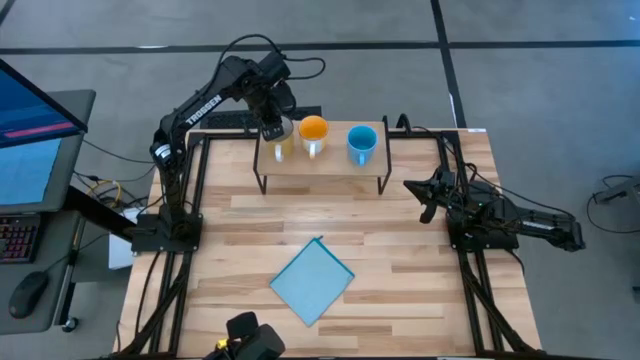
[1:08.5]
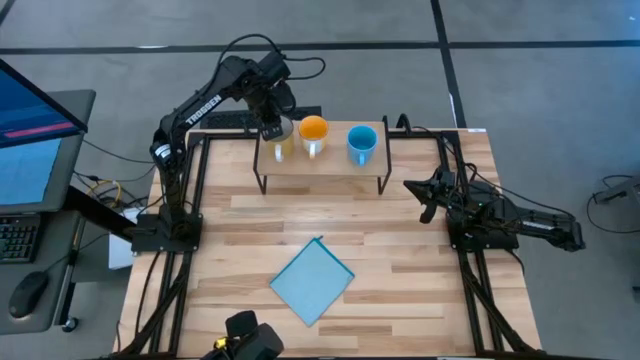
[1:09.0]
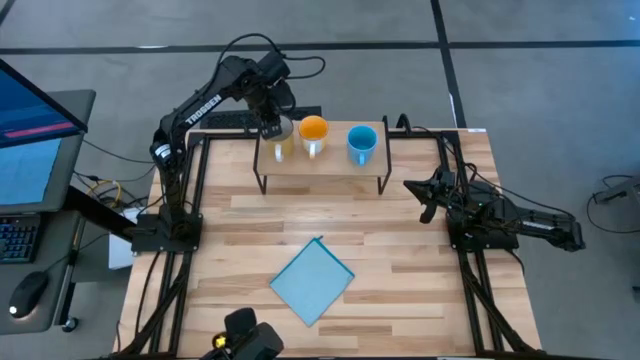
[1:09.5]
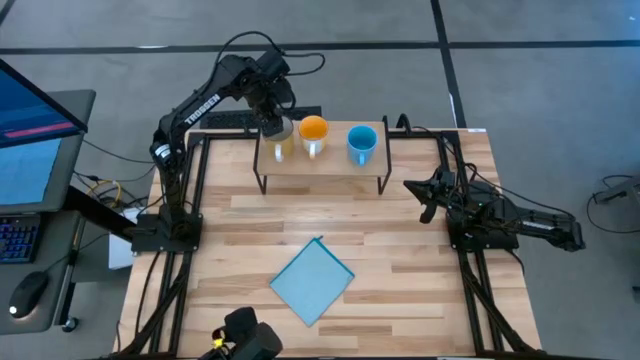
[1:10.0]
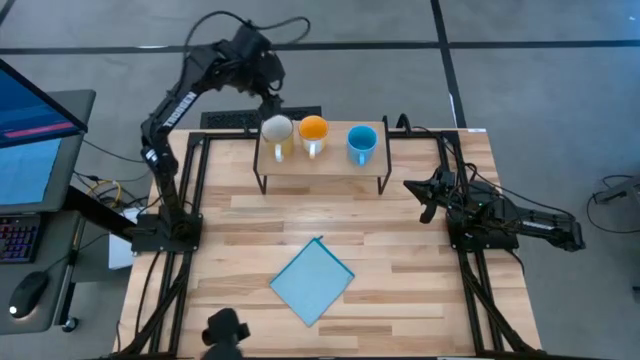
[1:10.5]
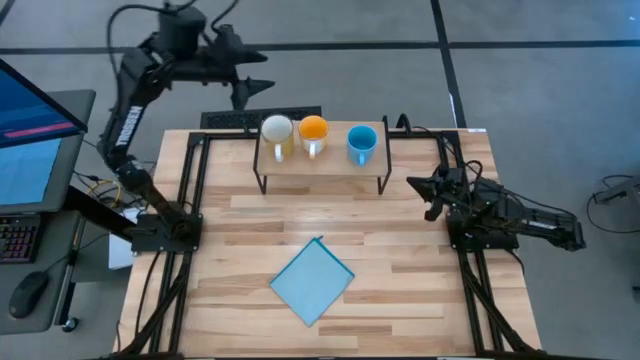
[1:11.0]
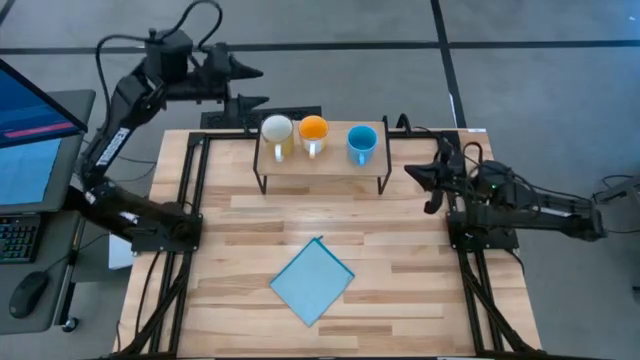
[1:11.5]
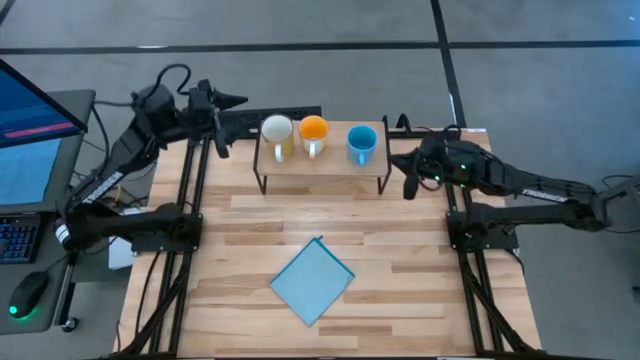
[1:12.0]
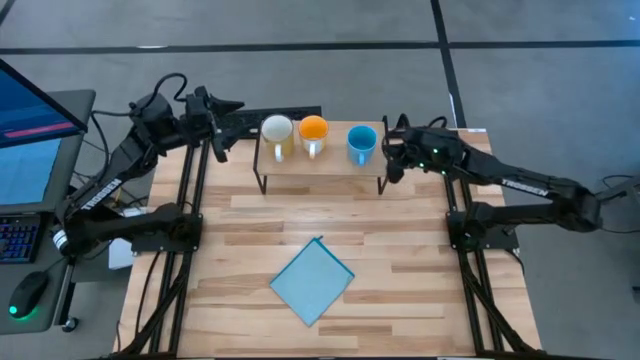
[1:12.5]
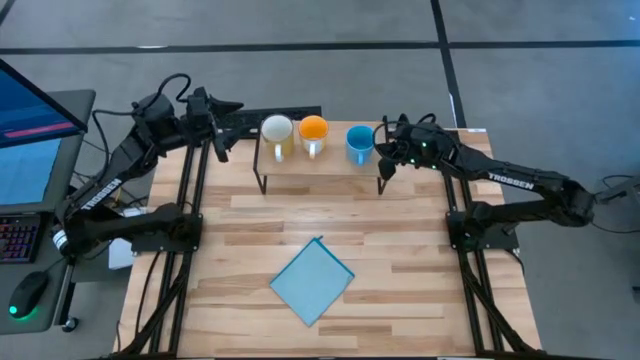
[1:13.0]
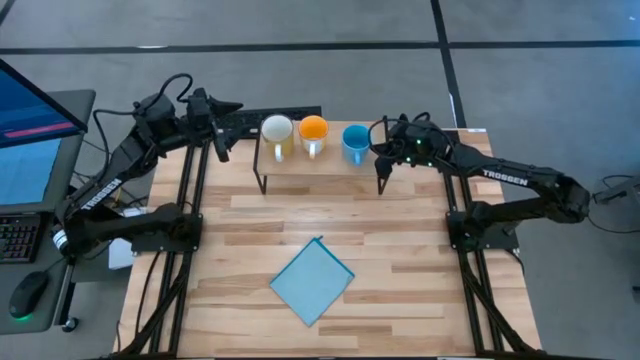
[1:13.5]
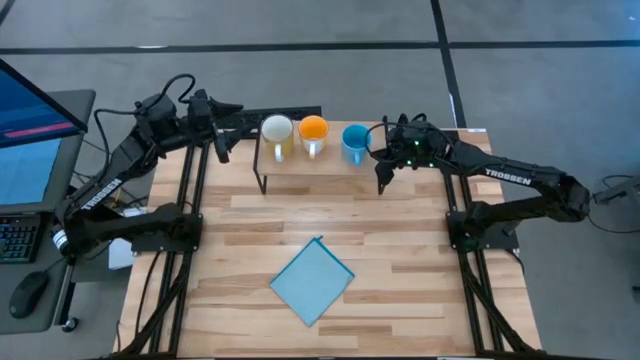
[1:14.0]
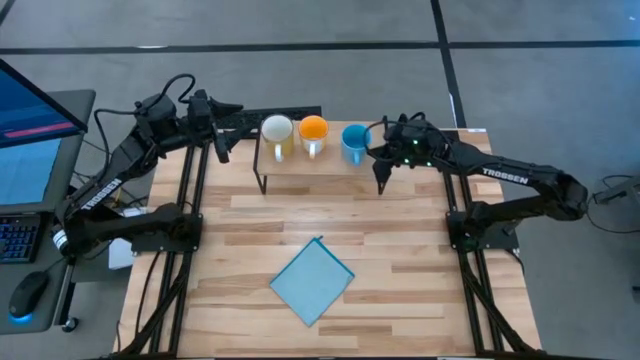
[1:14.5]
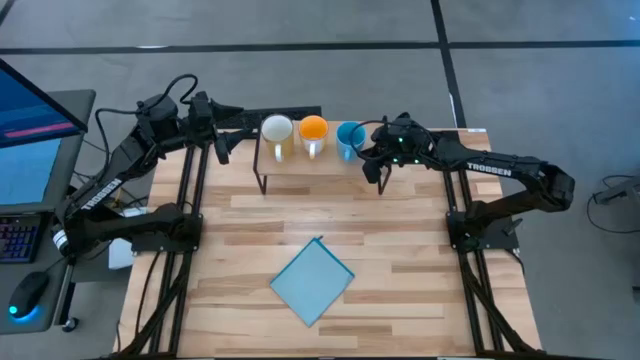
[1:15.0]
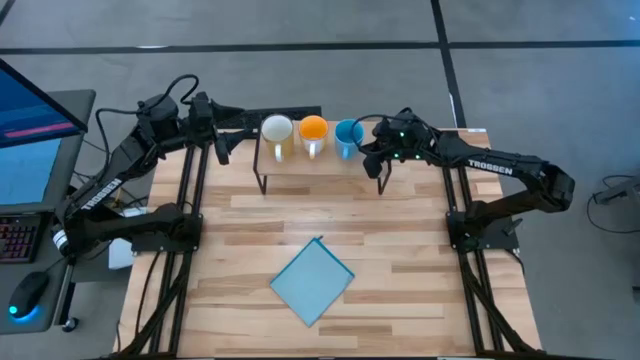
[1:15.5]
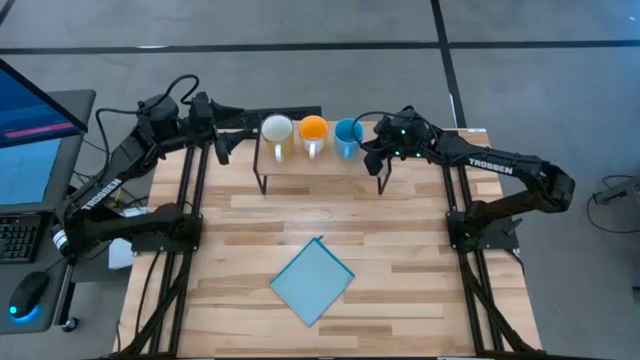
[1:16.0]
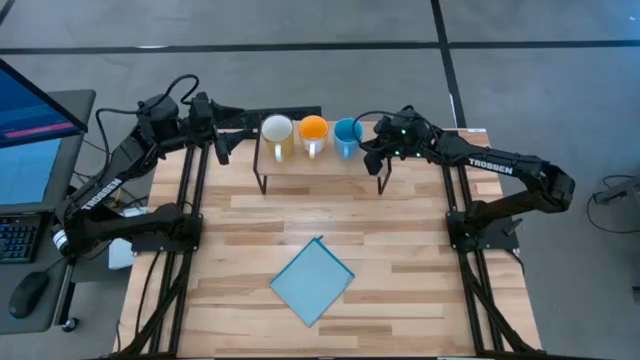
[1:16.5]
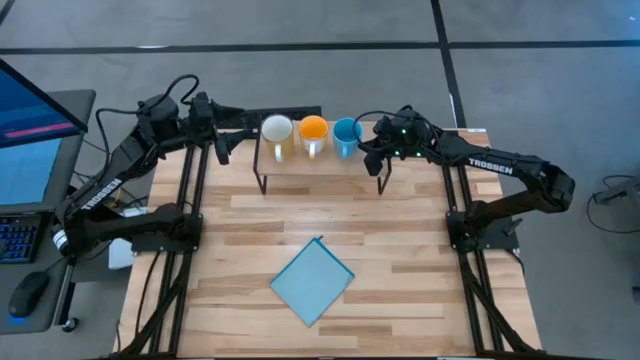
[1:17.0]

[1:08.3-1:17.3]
Task: Stack small to large cups/mugs on shelf
Adjust the blue mug on the shelf

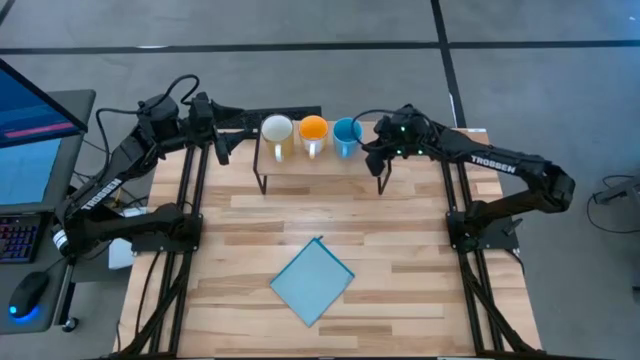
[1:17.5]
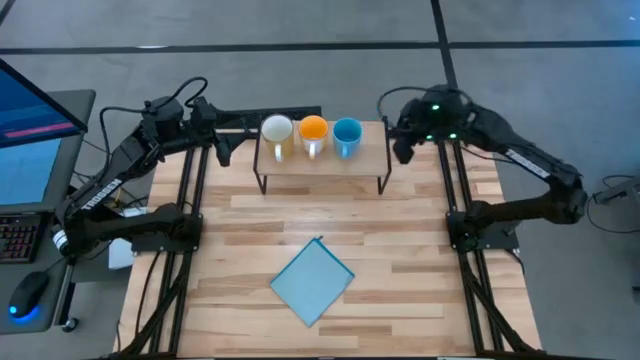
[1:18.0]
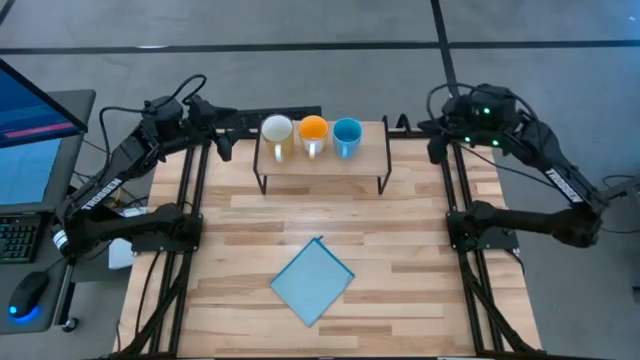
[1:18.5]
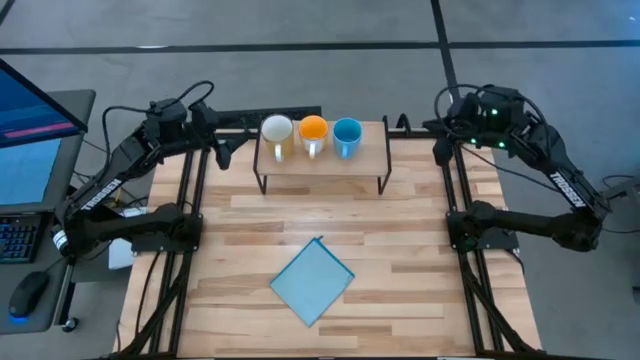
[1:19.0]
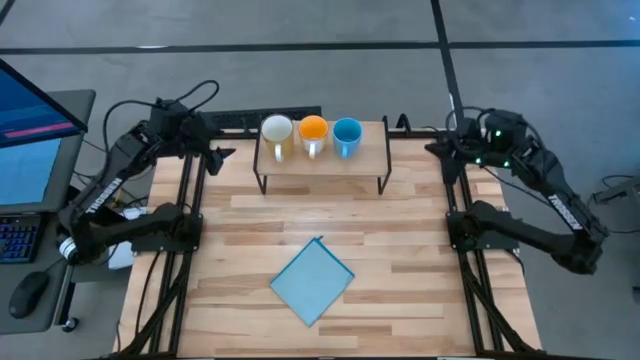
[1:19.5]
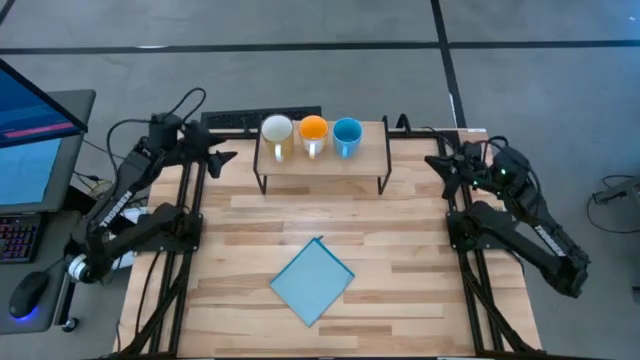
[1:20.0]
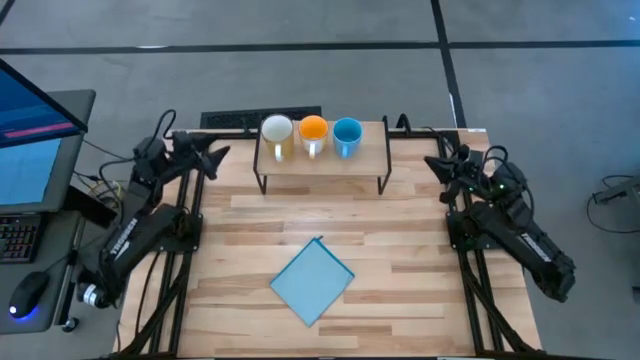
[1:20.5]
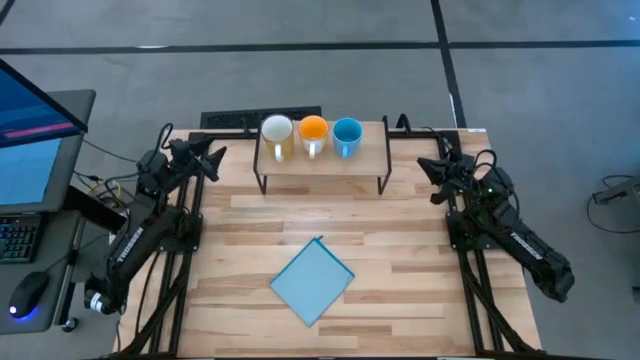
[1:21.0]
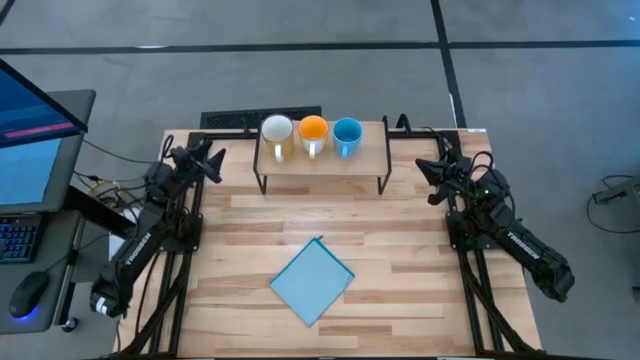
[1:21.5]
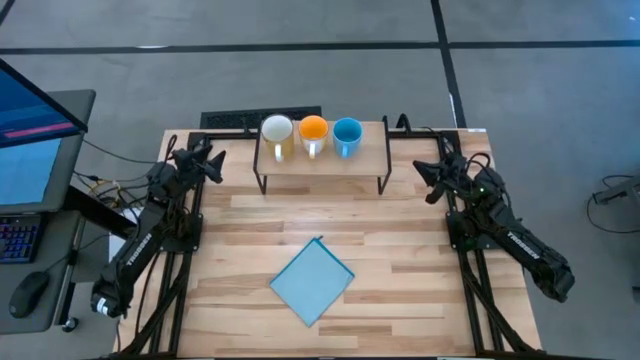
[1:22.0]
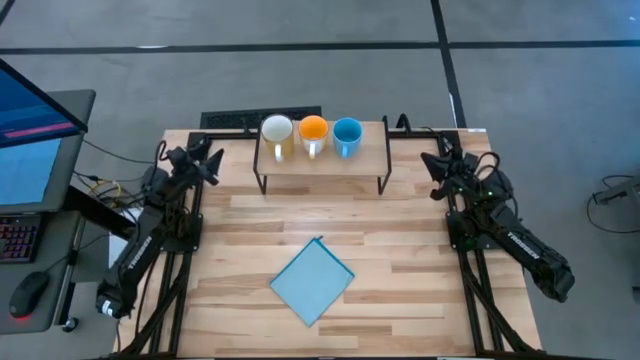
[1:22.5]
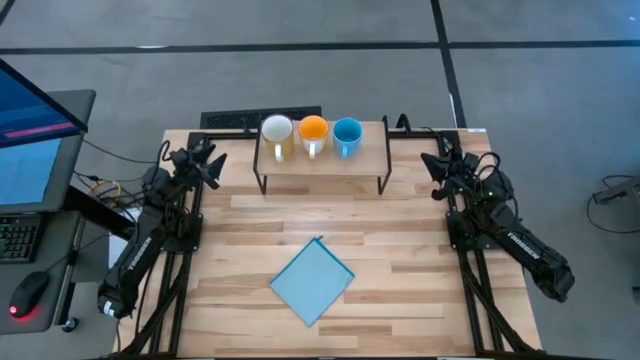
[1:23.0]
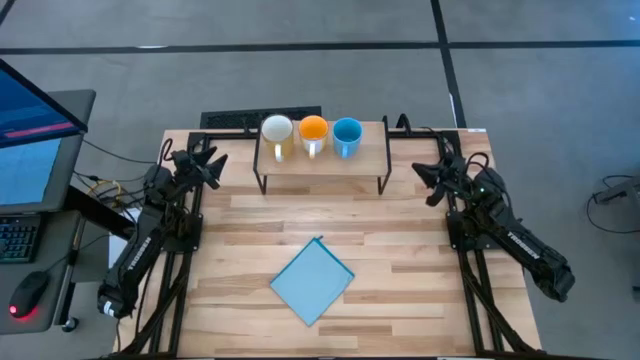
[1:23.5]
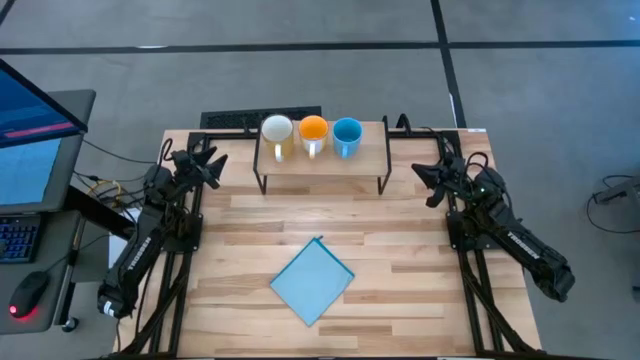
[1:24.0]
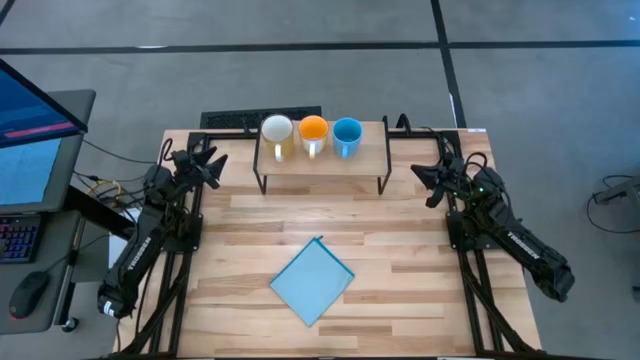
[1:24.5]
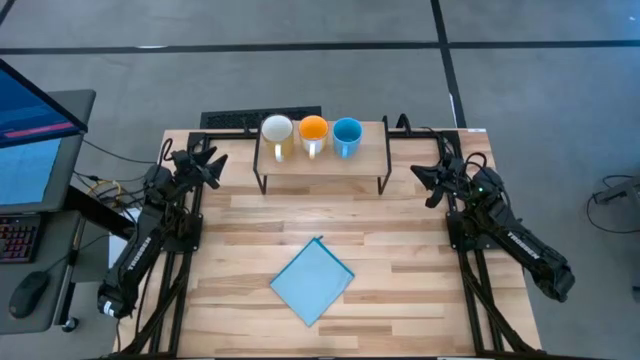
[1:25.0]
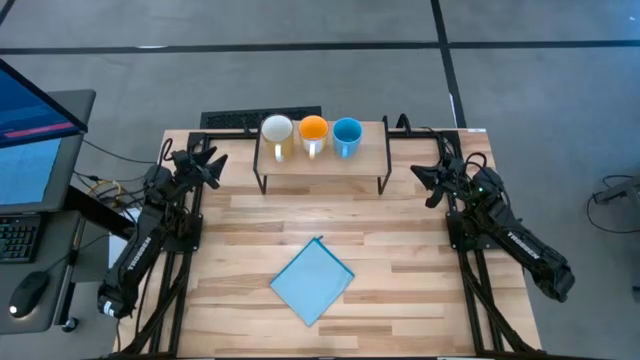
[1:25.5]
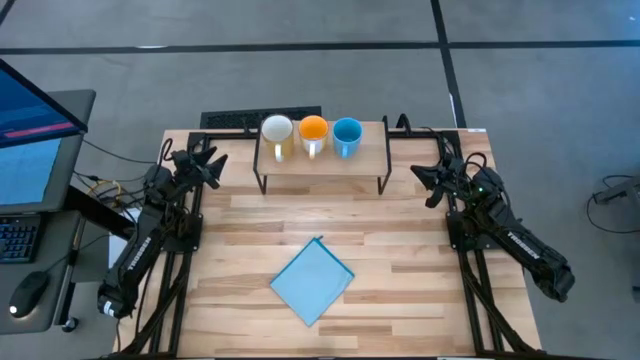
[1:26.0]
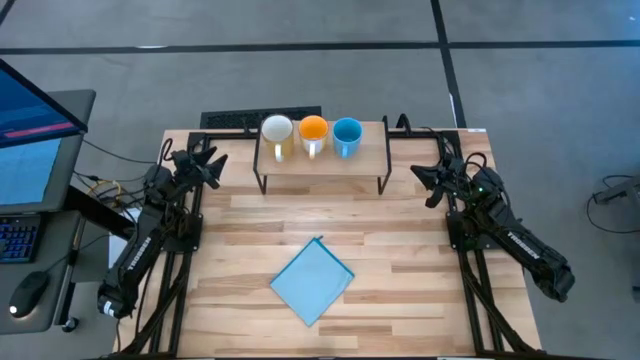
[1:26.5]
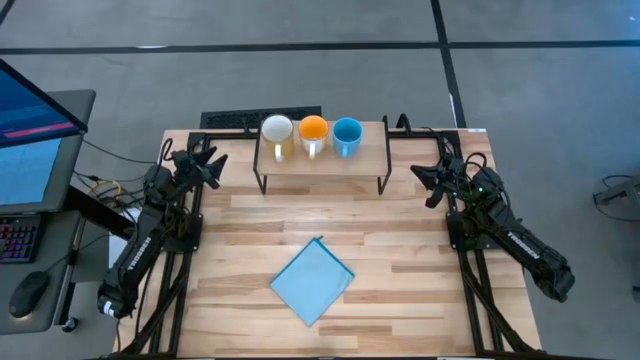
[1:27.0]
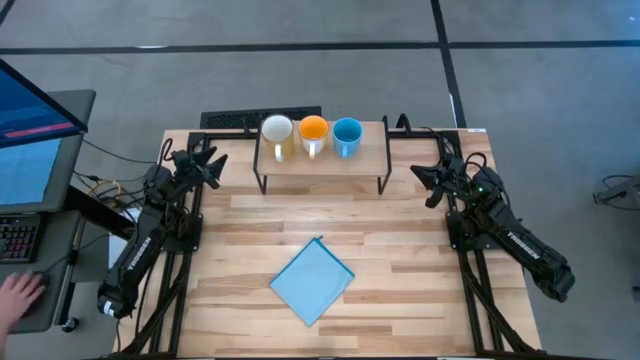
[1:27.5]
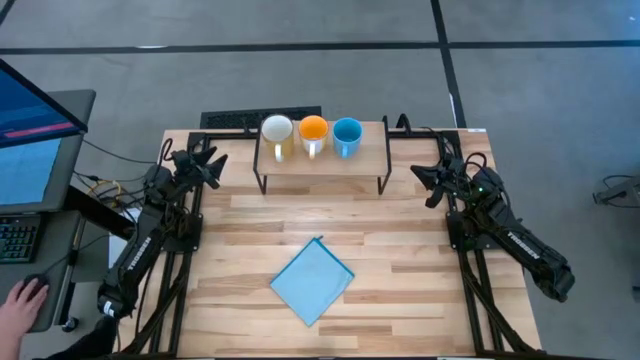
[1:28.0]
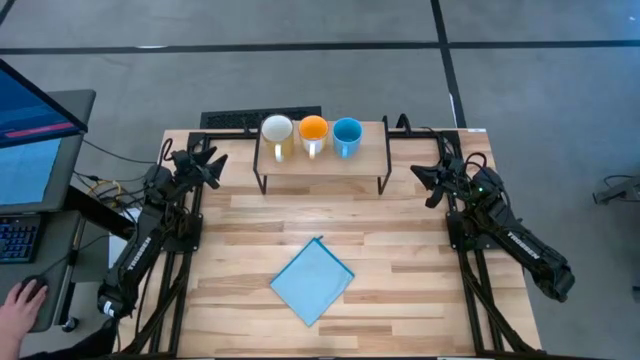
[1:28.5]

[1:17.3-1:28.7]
Return to Home Position

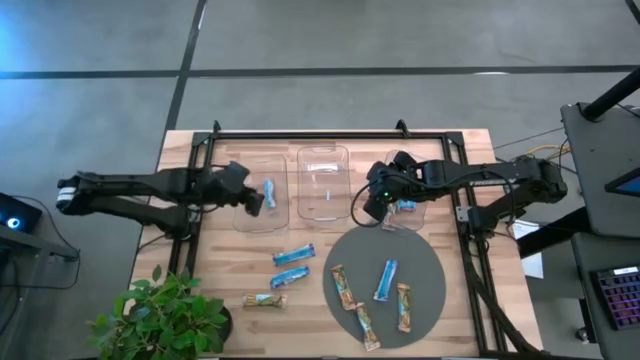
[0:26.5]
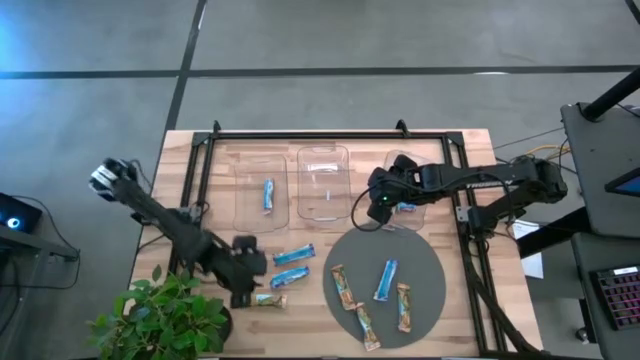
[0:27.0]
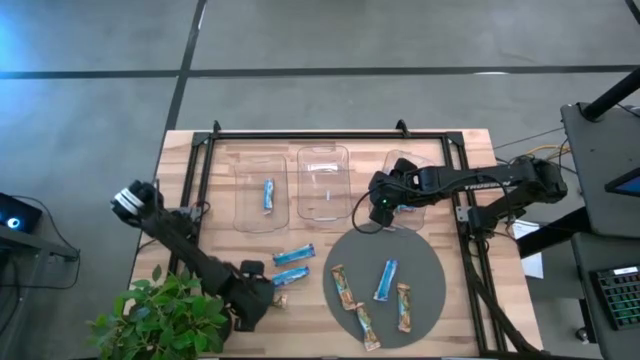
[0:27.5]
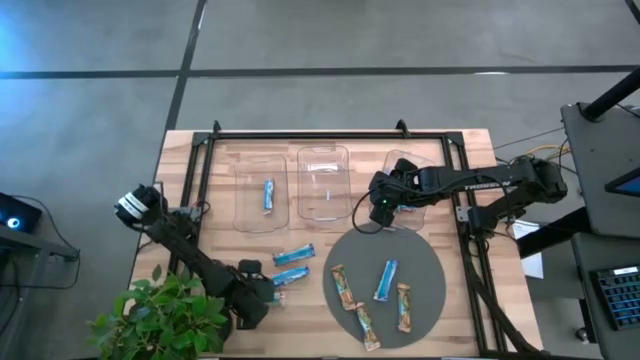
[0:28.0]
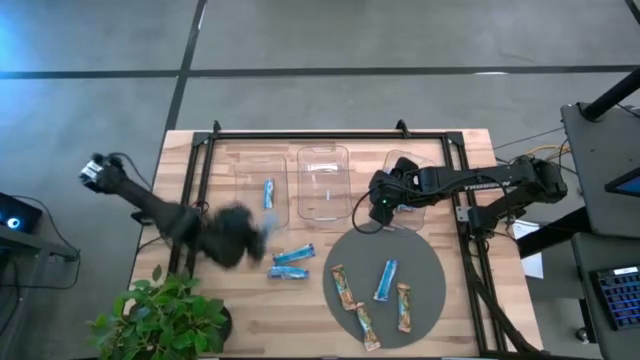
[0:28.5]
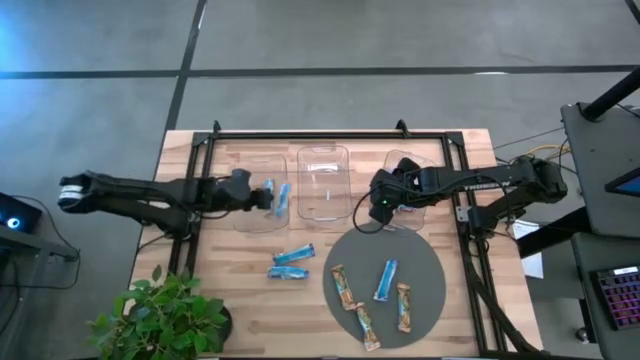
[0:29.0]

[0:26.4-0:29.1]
Task: Pick and place Granola Bars by type
Put the yellow granola bar into the left transparent bin
